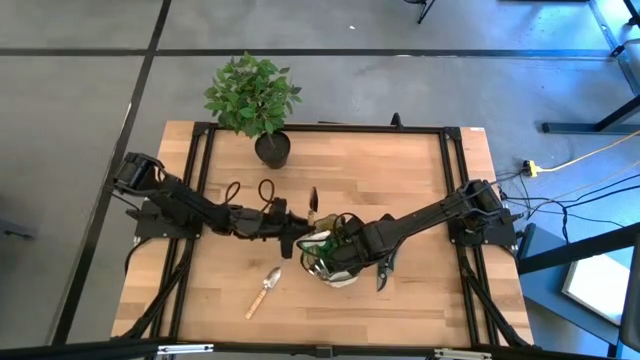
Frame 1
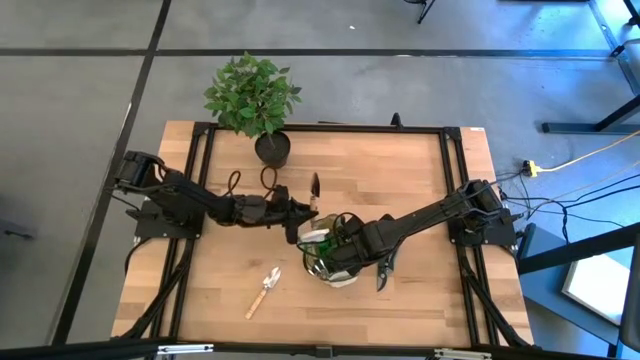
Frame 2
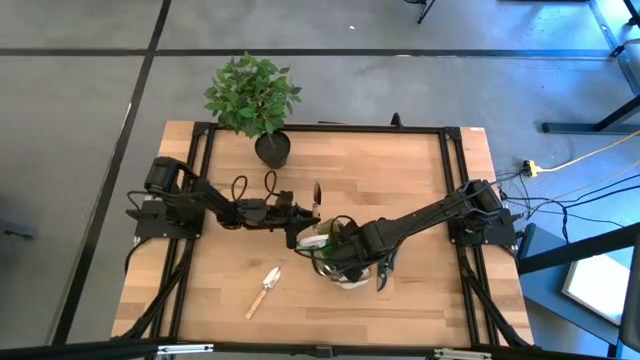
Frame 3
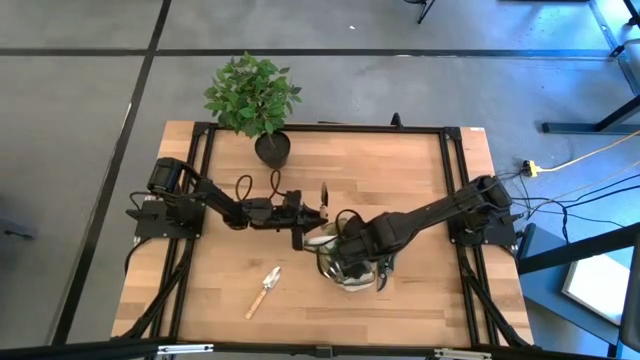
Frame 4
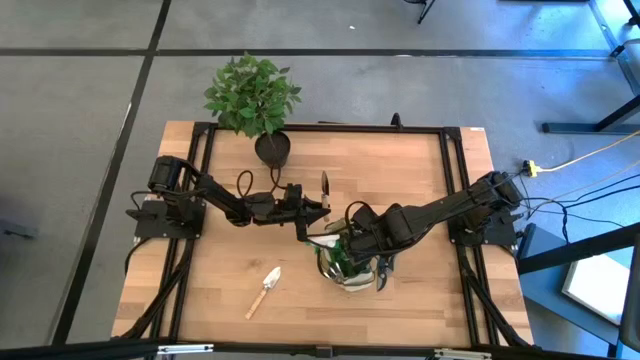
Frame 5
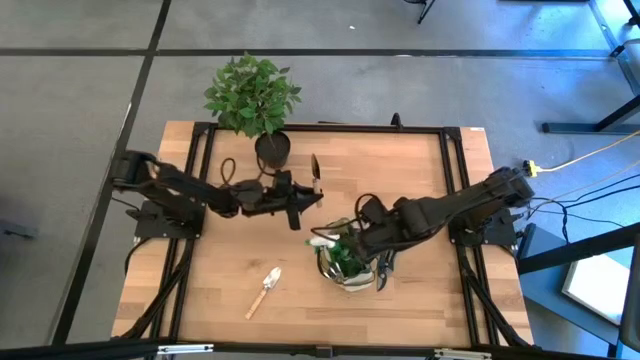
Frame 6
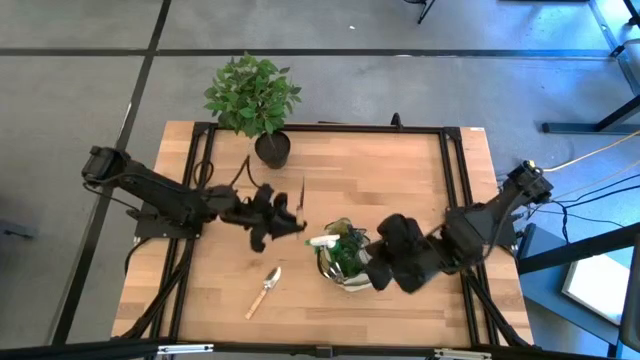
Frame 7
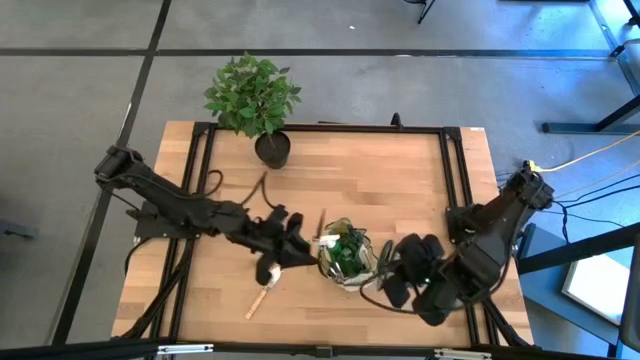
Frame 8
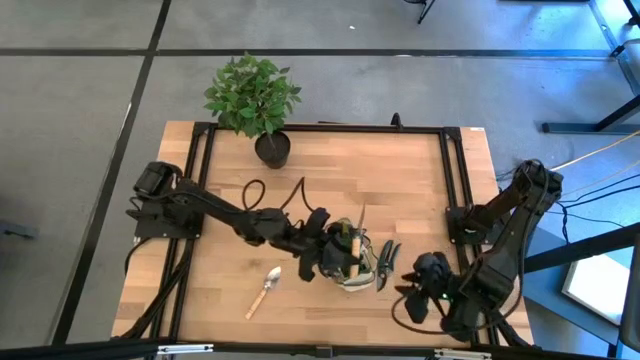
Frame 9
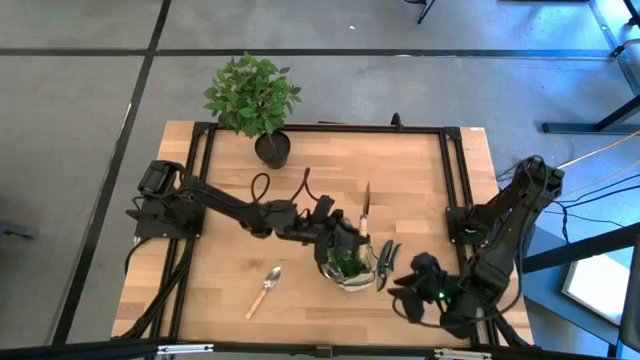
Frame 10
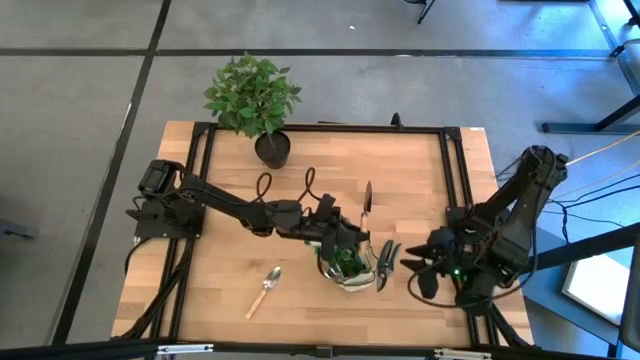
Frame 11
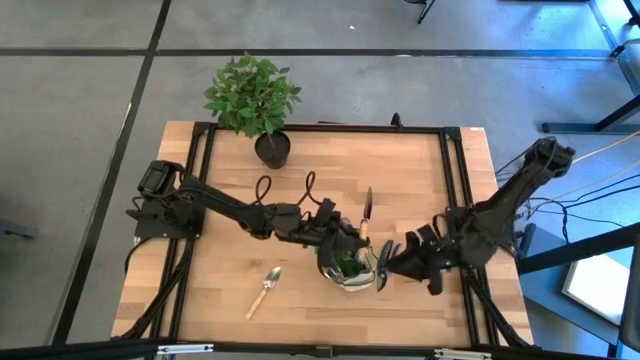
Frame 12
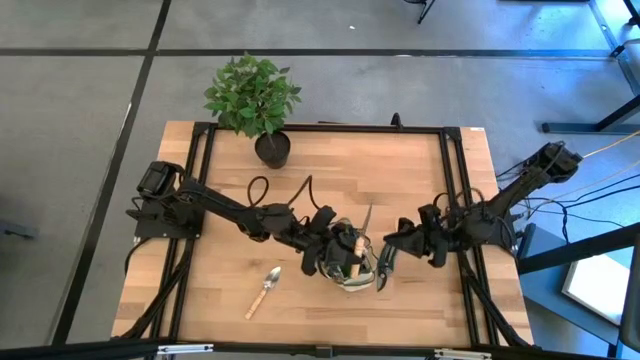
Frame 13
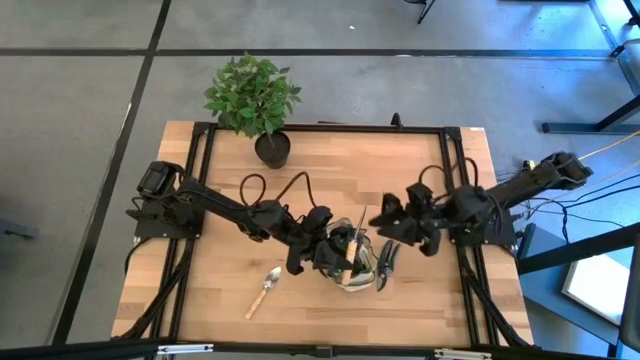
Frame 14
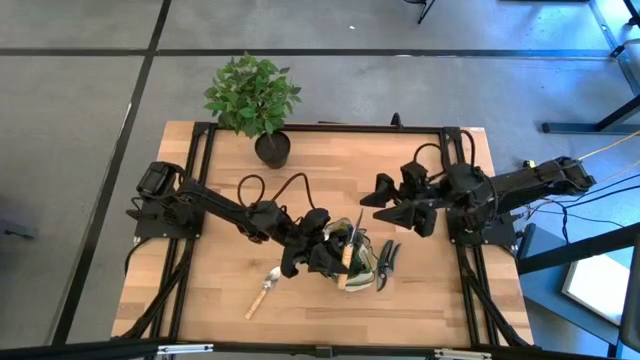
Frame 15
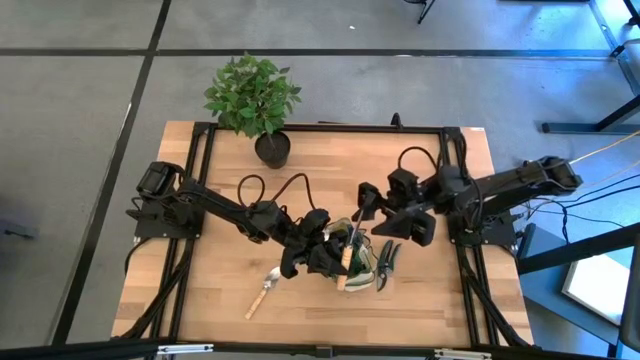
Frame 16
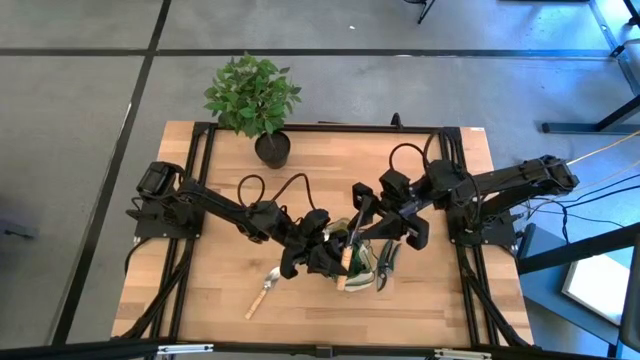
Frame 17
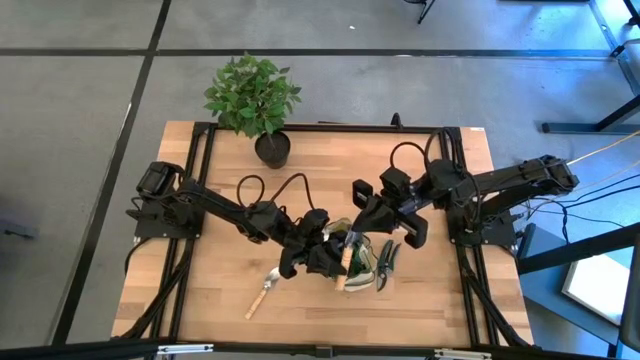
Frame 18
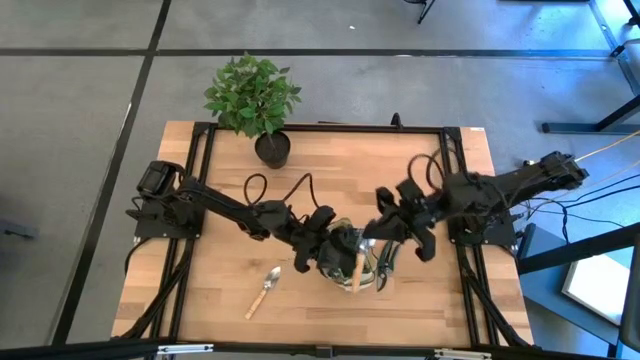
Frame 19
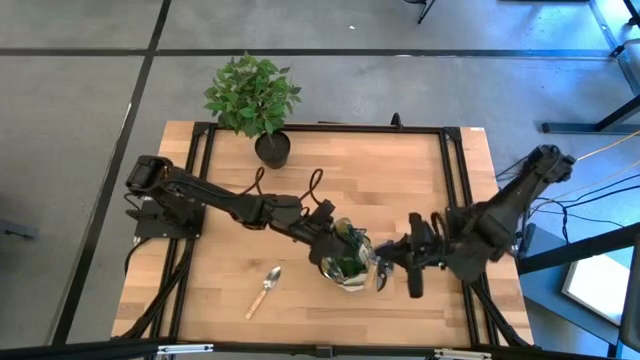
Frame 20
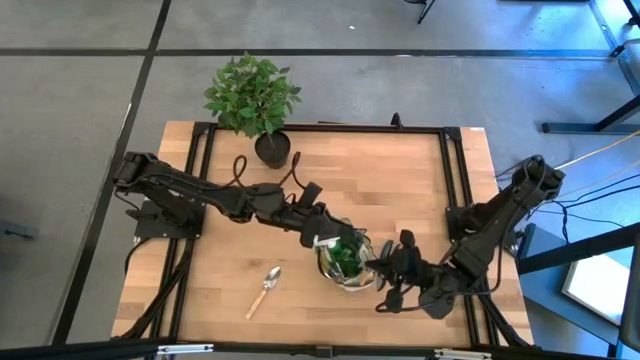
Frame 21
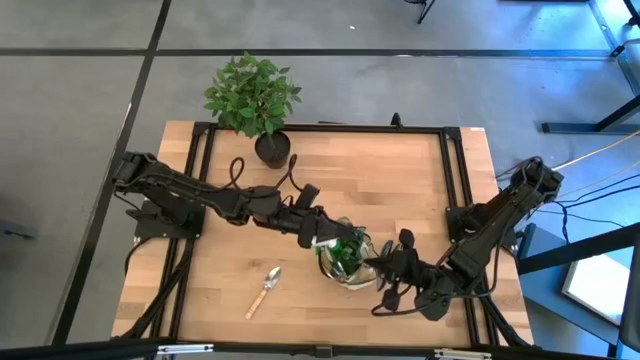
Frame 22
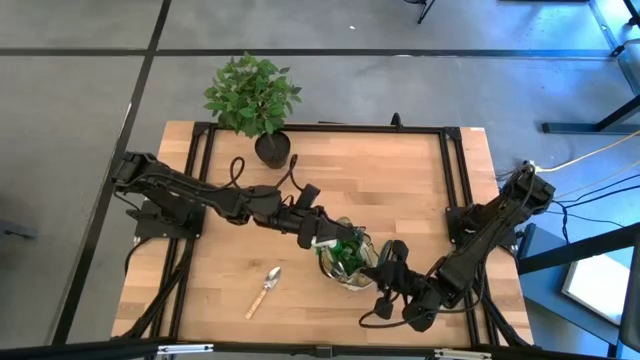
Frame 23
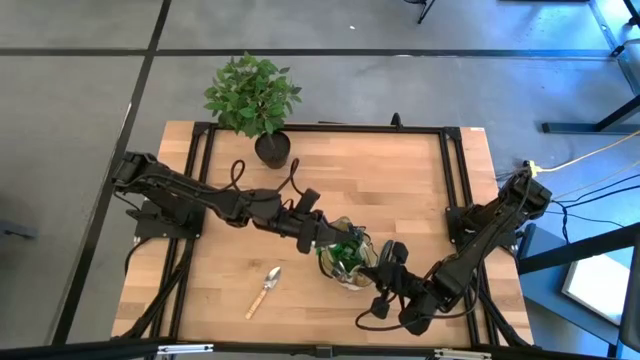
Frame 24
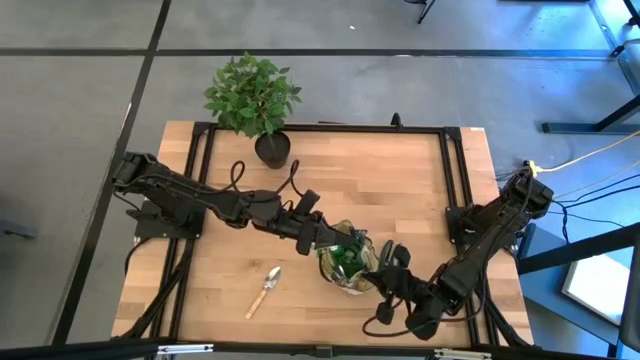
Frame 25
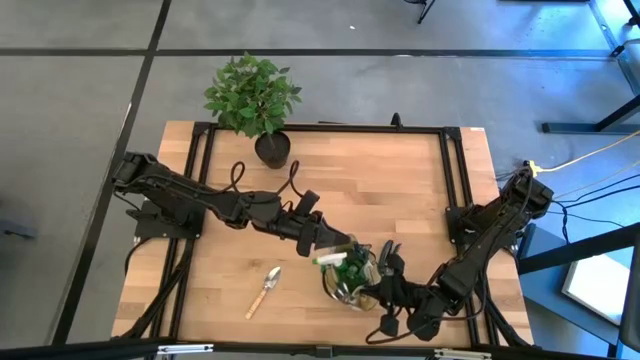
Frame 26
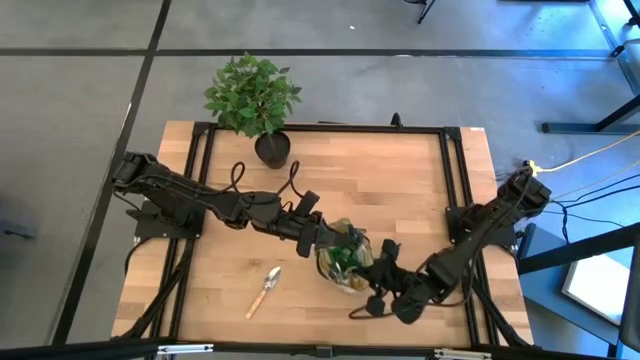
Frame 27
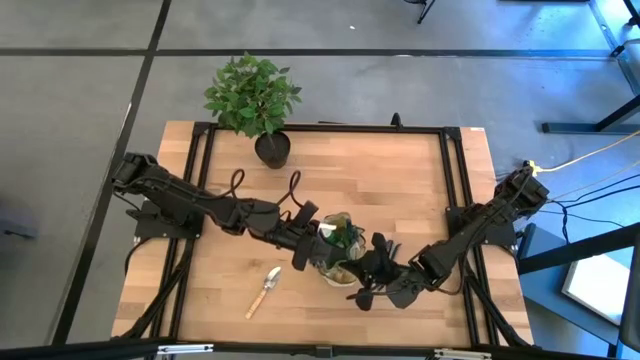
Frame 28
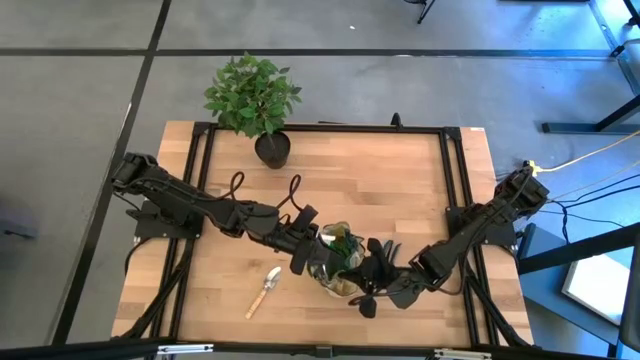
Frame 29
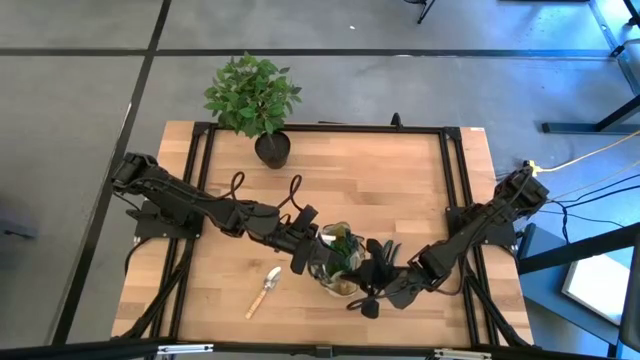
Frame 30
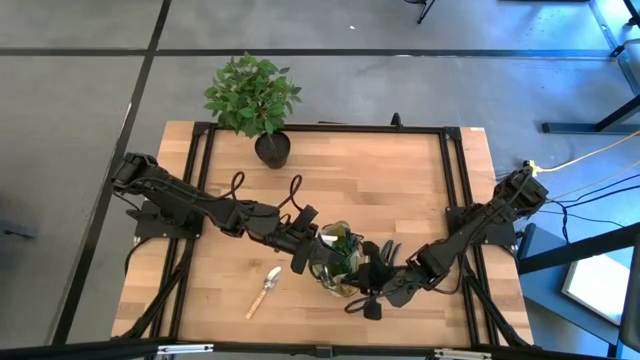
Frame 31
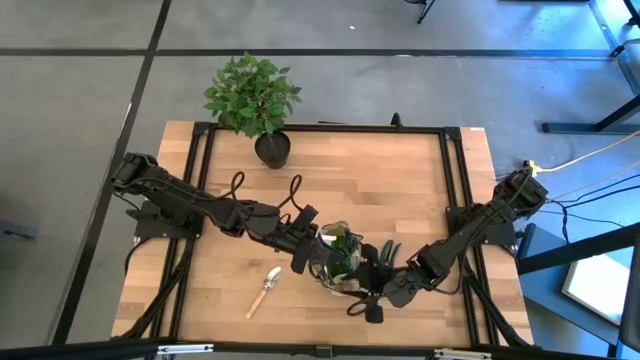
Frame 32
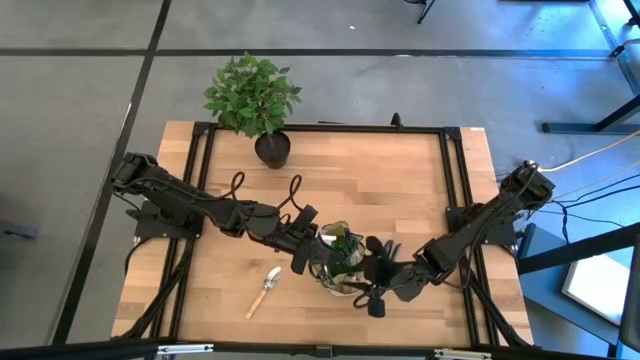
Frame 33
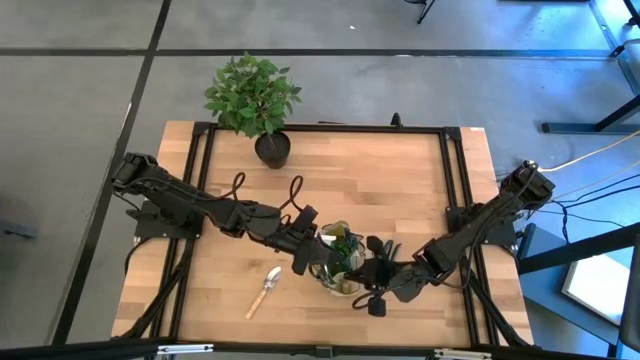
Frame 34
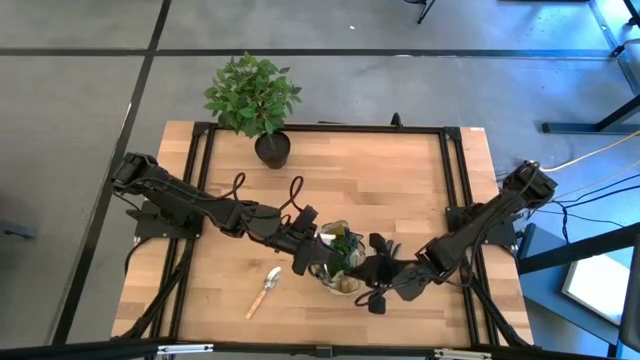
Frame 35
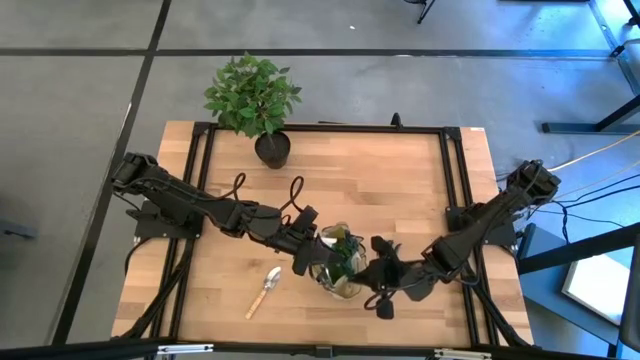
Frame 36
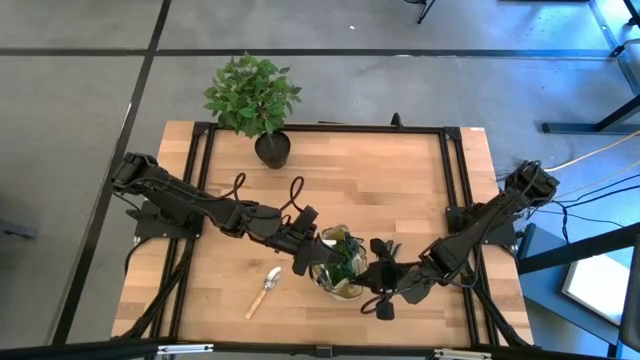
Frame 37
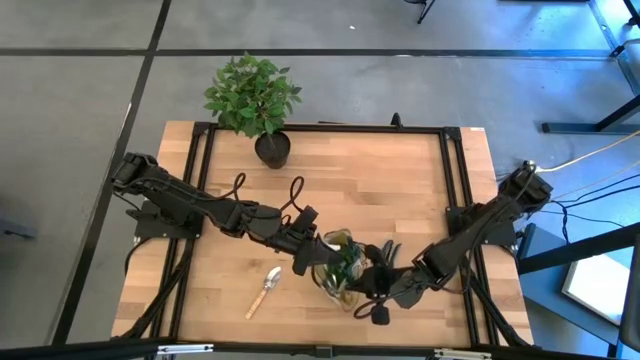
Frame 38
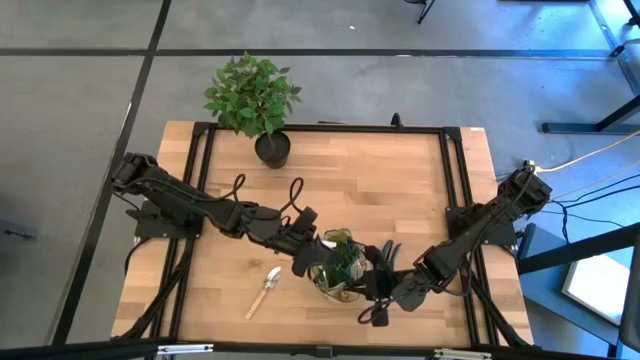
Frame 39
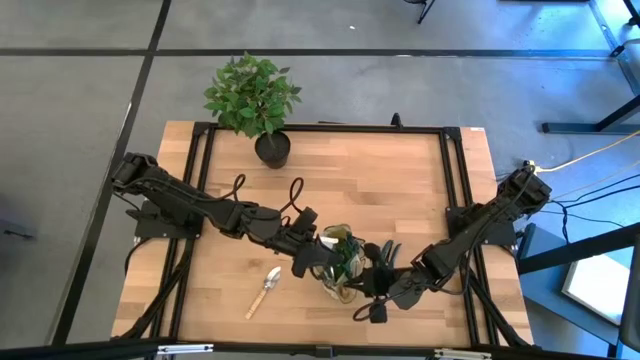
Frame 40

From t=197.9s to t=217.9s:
Task: Pick & Place Garden tools in Gardening bag
Put the right brown trowel into the brown gardening bag
